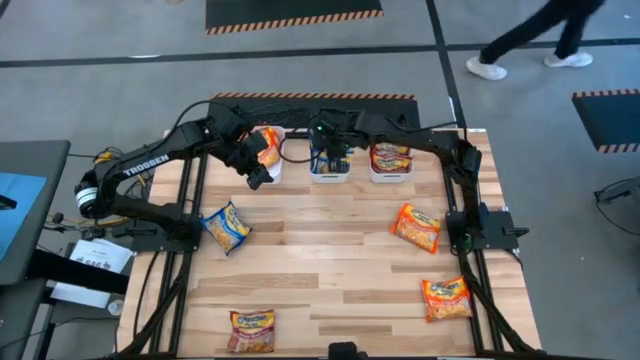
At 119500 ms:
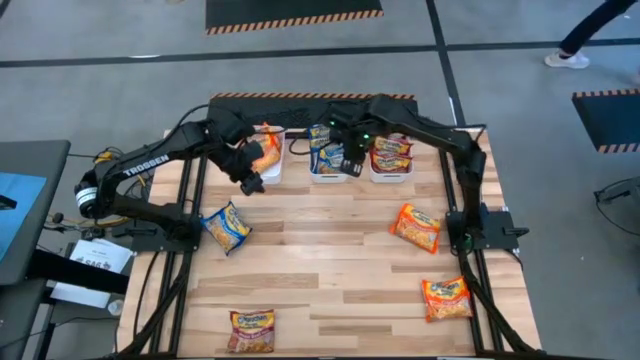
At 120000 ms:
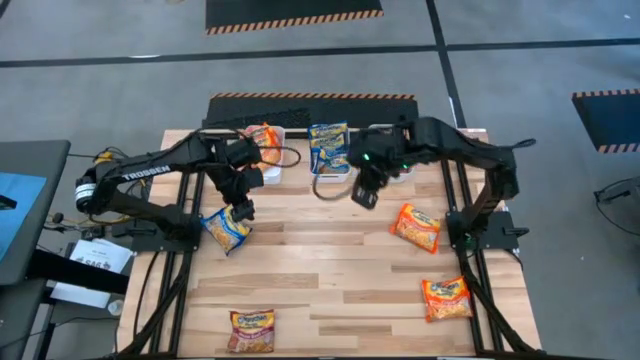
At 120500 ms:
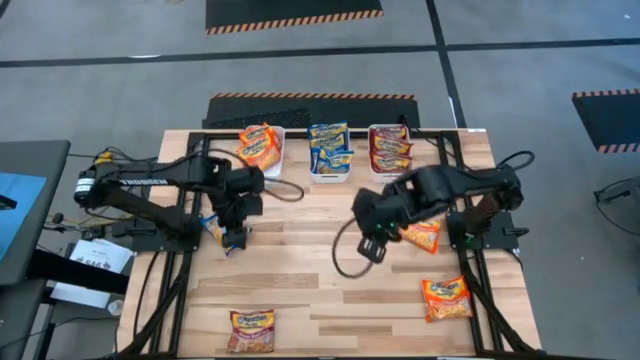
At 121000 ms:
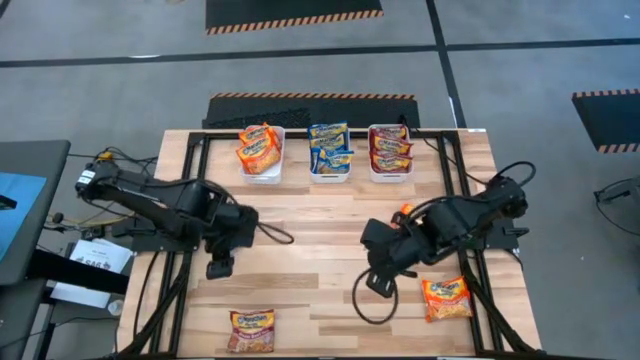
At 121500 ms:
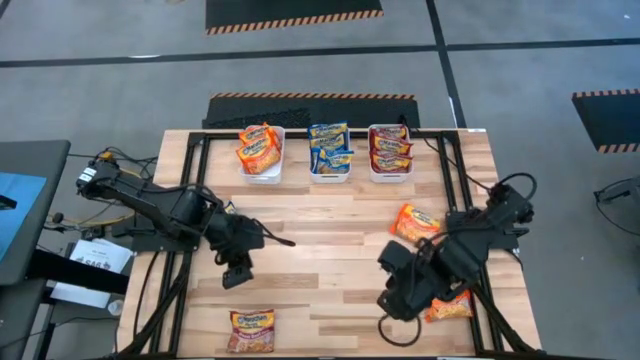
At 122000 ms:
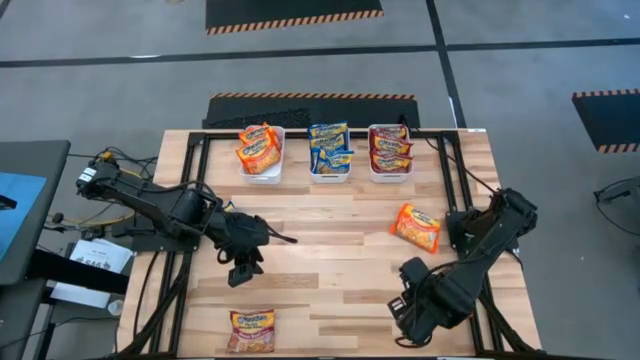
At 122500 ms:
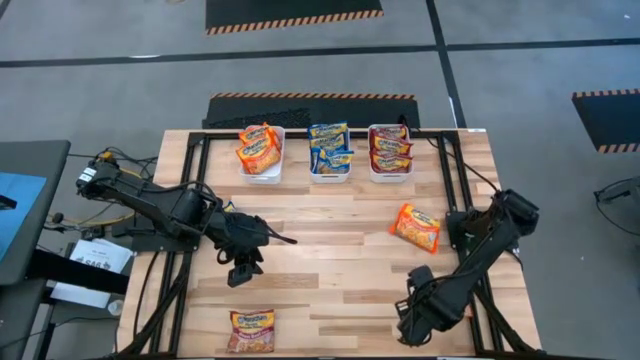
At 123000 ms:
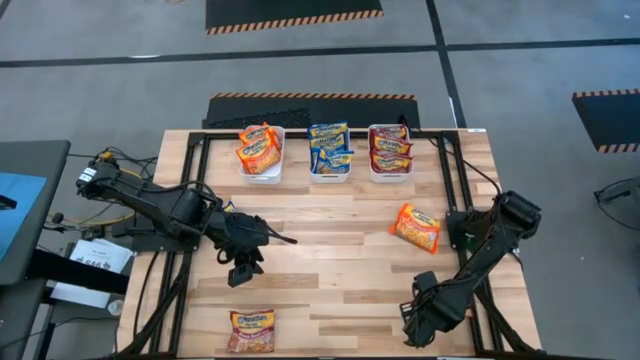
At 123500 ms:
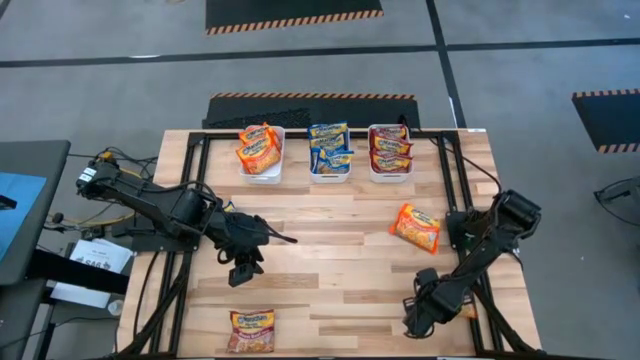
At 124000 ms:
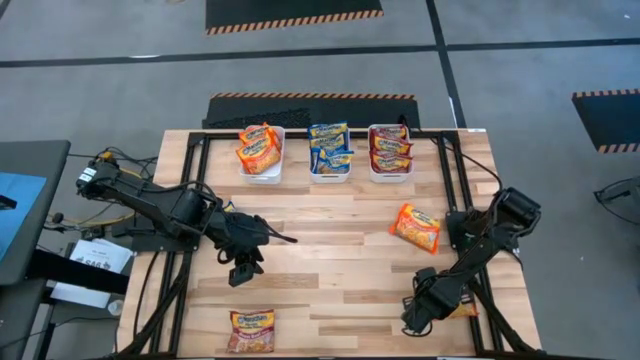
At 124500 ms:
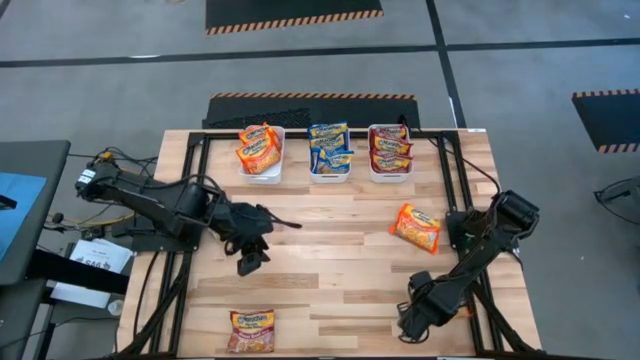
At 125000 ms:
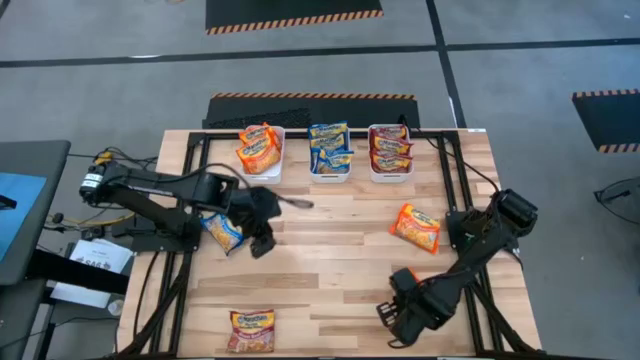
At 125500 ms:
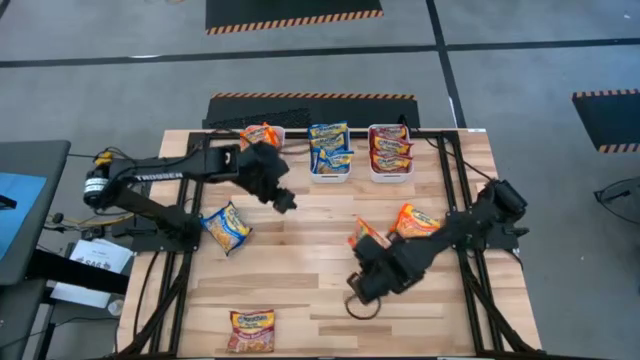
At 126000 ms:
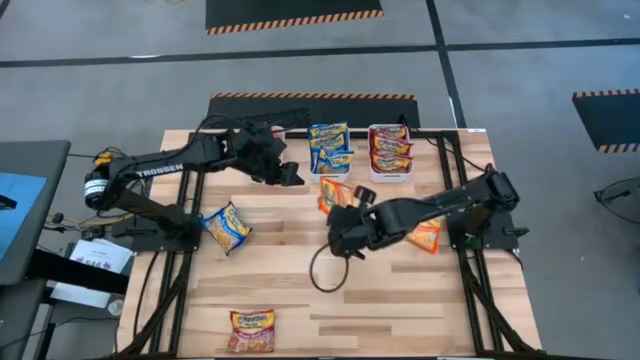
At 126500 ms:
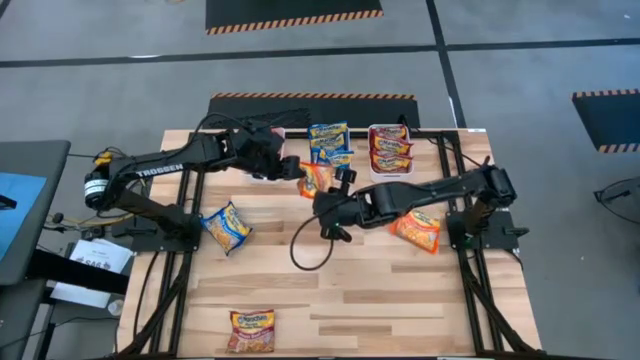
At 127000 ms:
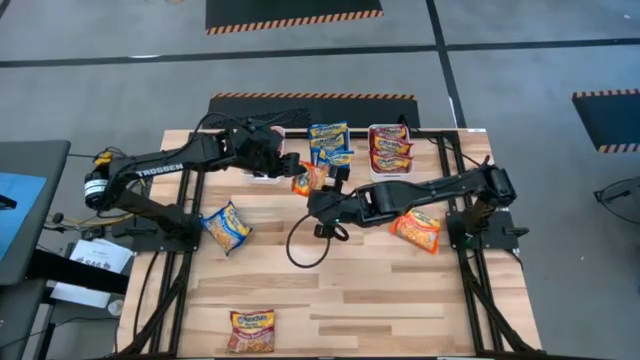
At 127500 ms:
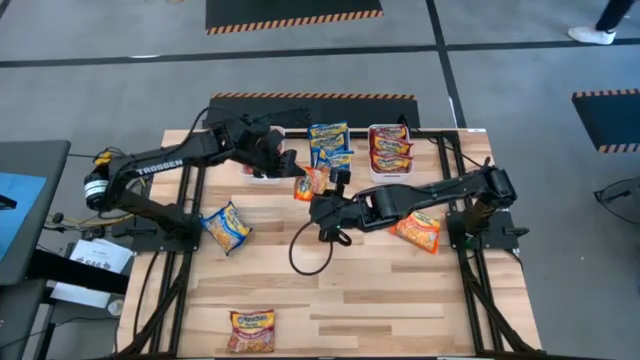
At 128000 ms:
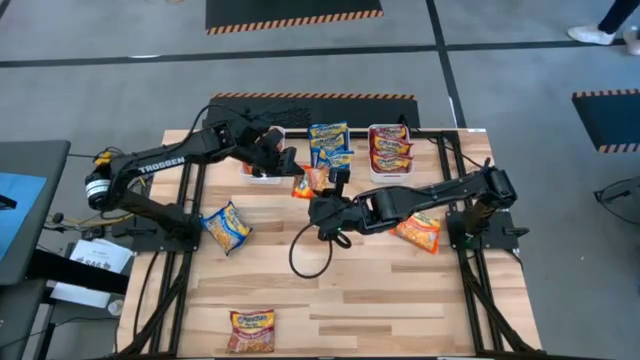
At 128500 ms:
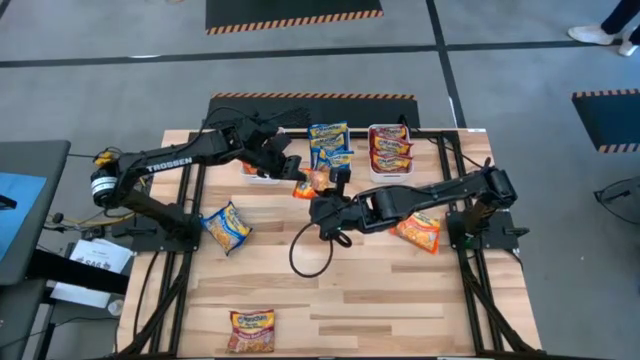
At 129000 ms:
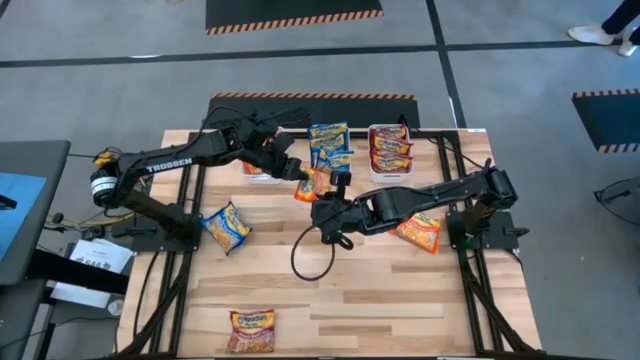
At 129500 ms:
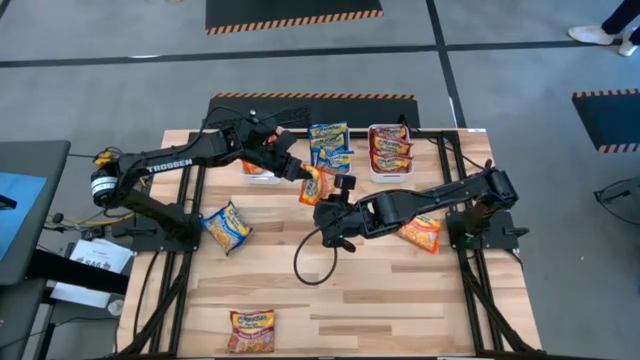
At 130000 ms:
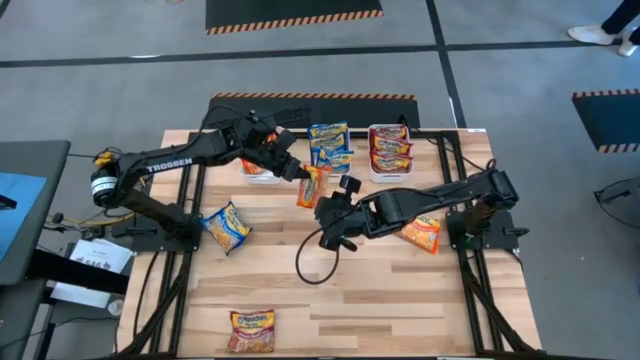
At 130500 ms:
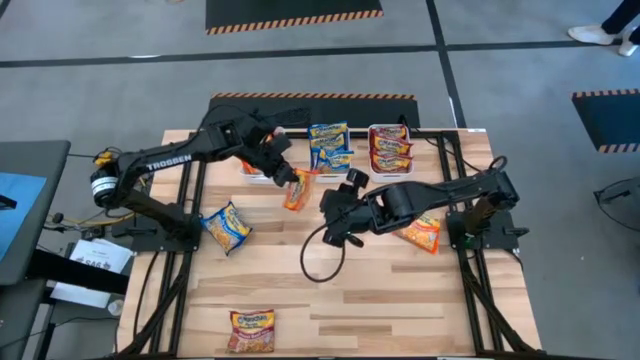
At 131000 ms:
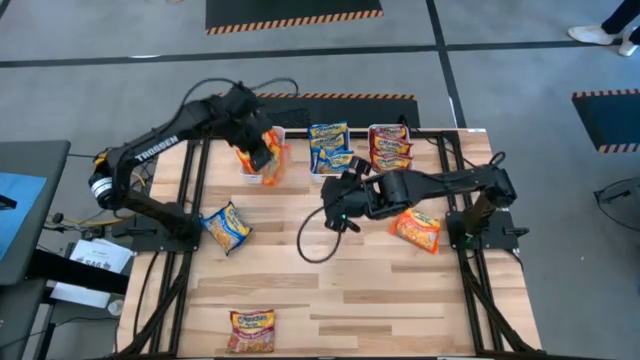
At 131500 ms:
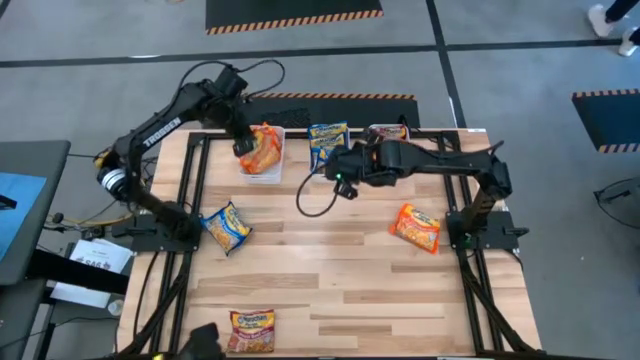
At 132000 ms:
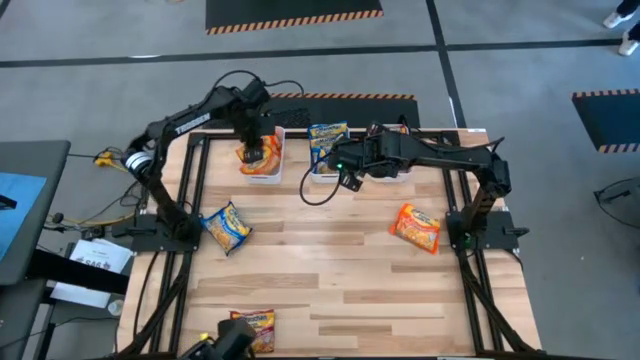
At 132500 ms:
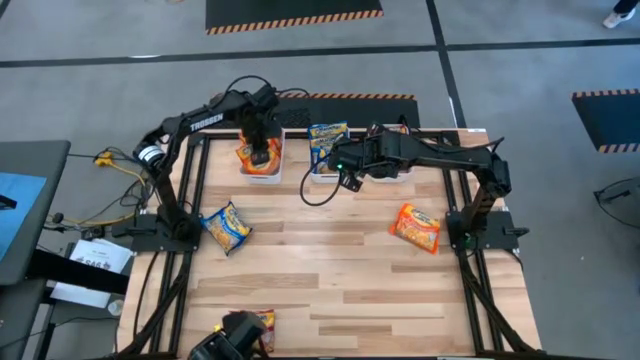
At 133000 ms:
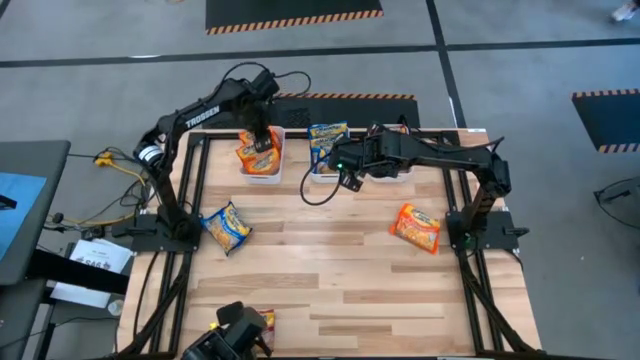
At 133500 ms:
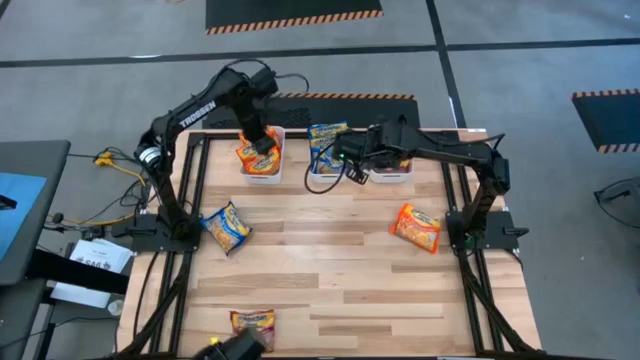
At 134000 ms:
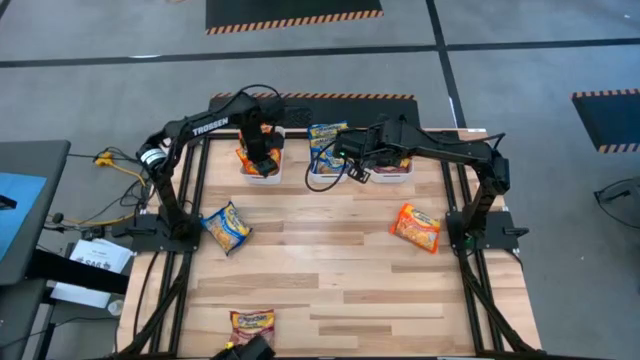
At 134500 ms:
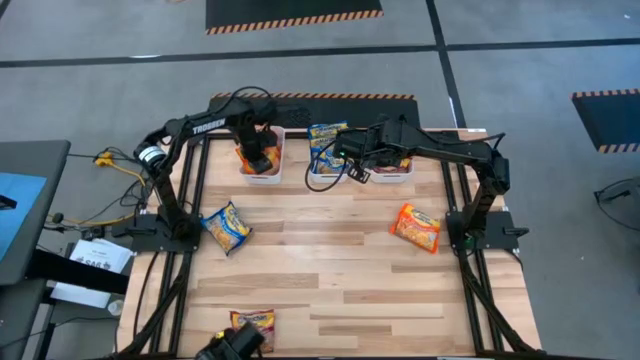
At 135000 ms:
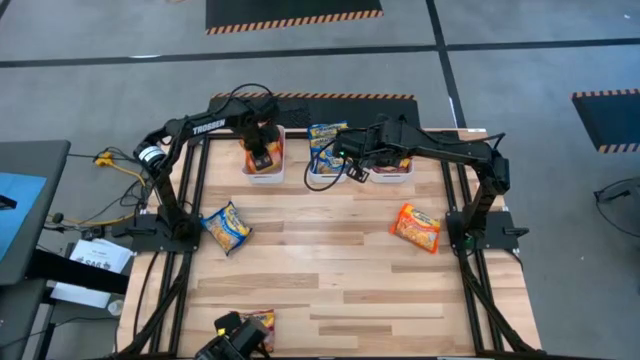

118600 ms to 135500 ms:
Task: Sort Maruchan noodles
Put the orange noodle pack into the left white bin

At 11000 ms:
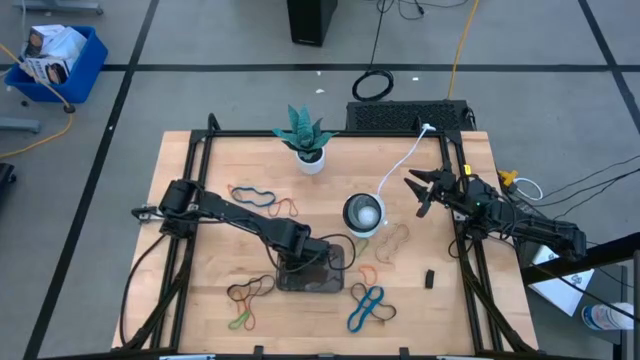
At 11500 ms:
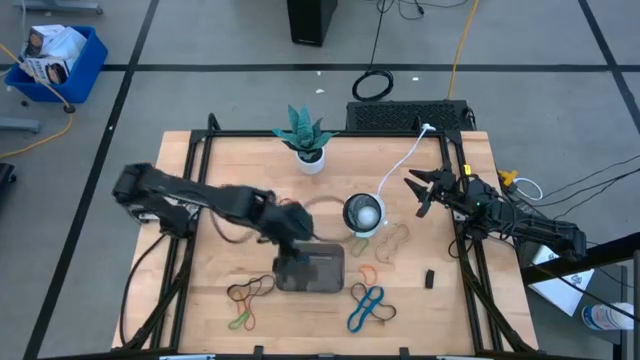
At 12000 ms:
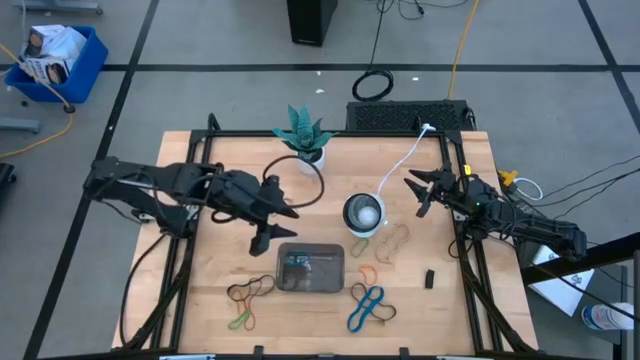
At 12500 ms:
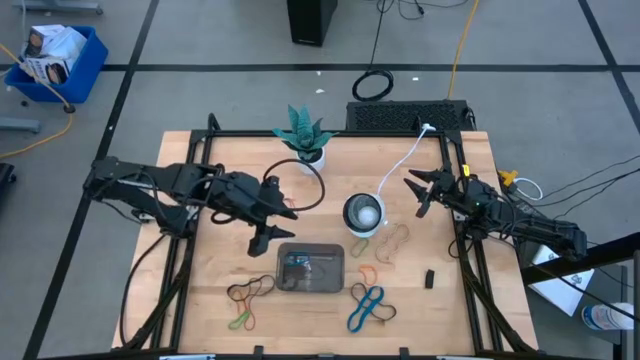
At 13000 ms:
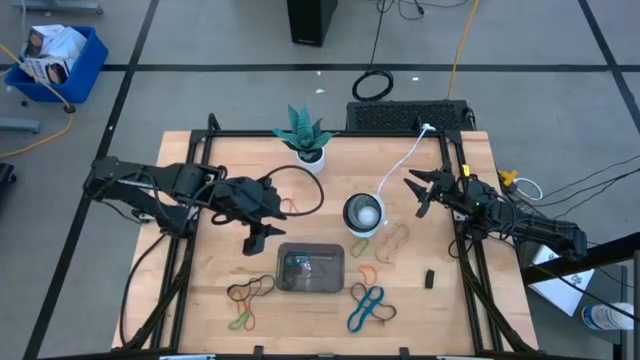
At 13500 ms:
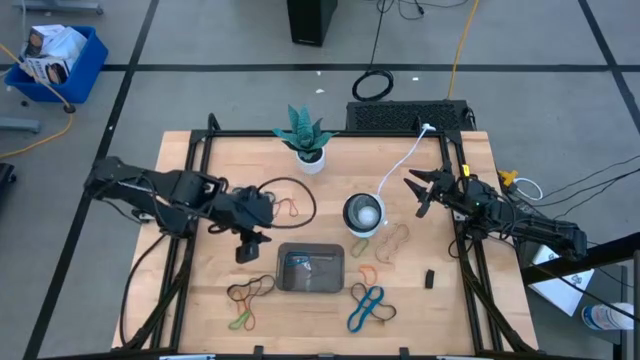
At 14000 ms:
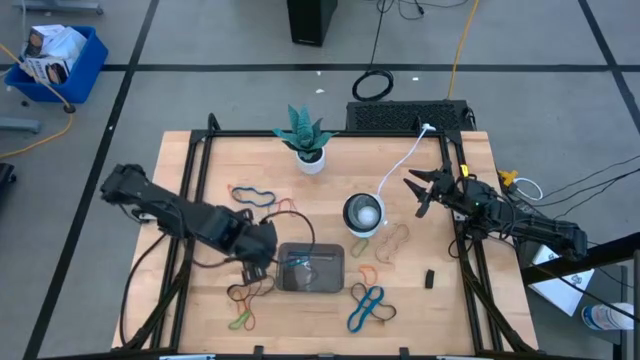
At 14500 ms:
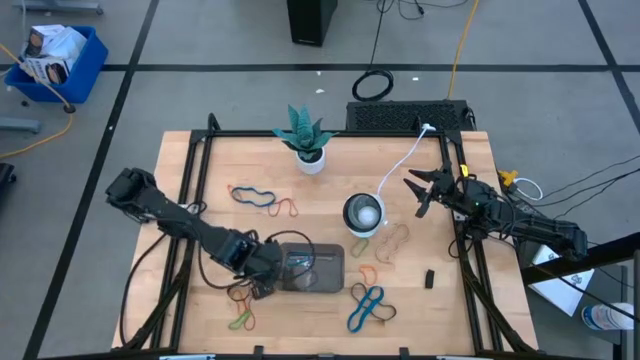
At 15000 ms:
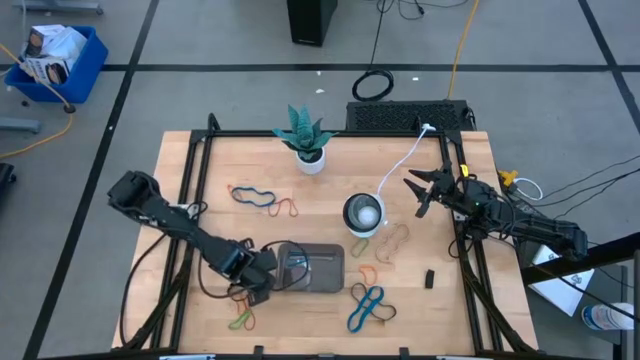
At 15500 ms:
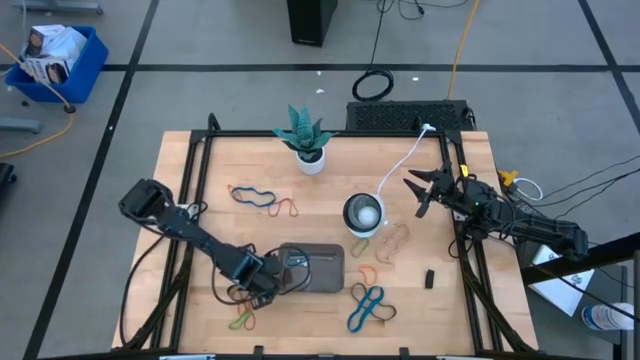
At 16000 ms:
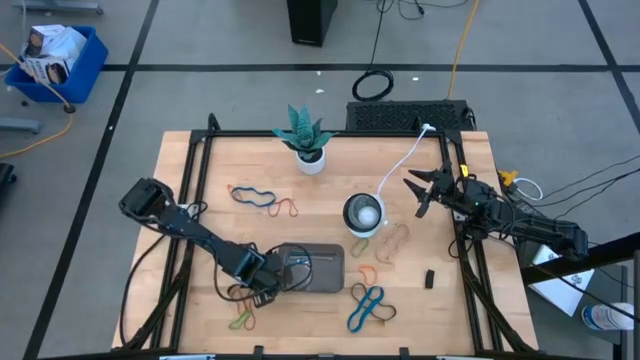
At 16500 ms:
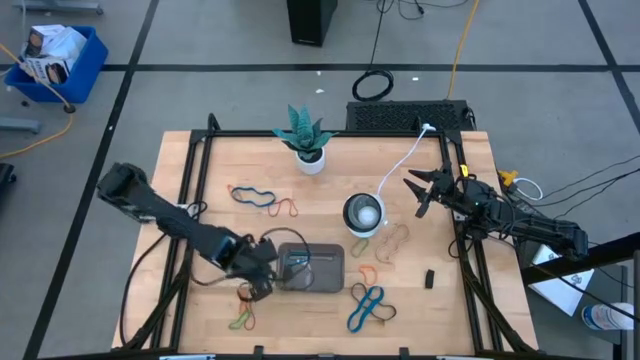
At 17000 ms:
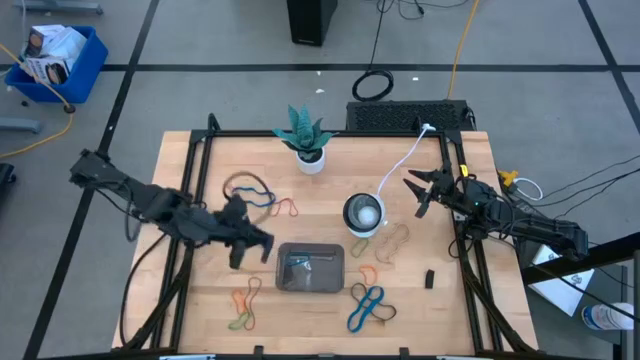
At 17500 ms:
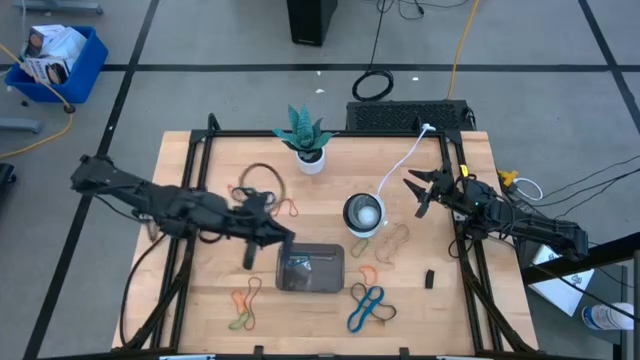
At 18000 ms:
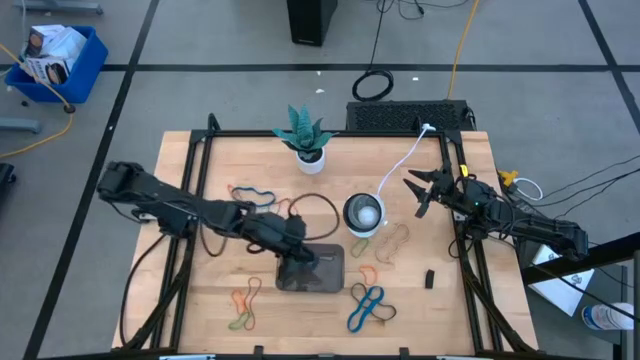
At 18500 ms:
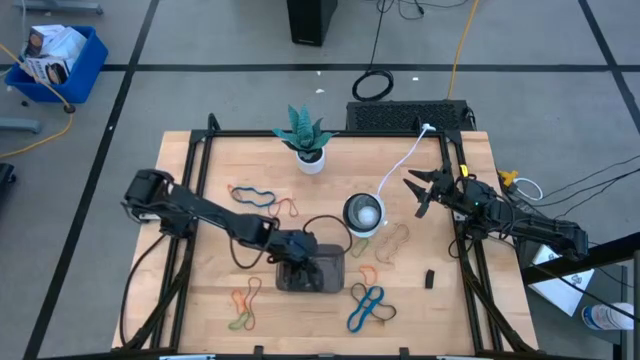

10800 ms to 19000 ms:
Task: Pick and place rubber bands into bin
Put the left black rubber band into the gray bin
